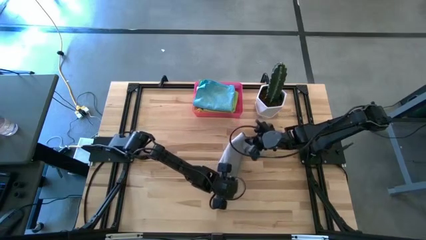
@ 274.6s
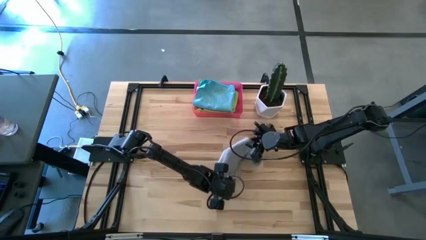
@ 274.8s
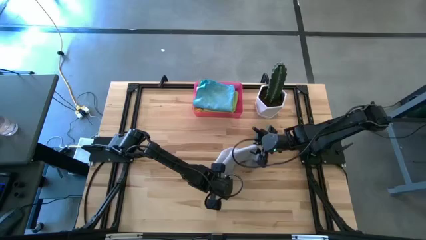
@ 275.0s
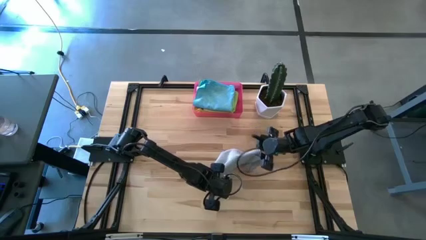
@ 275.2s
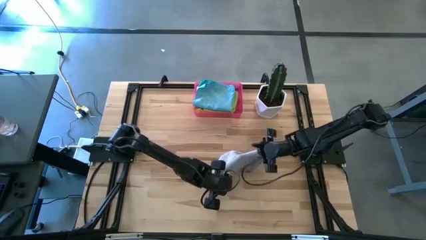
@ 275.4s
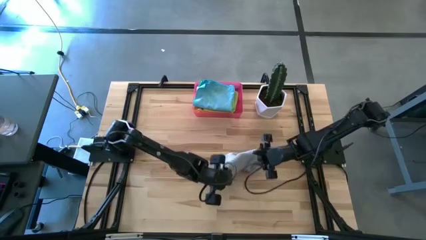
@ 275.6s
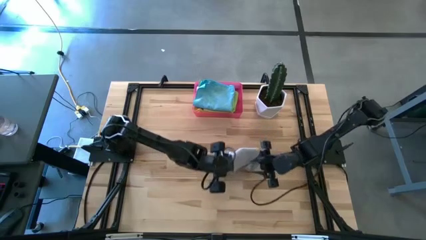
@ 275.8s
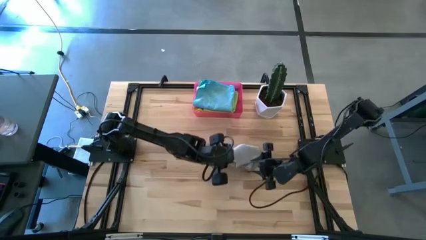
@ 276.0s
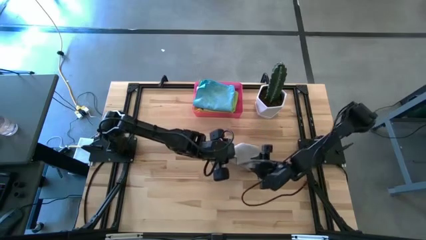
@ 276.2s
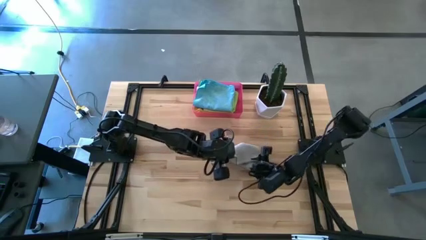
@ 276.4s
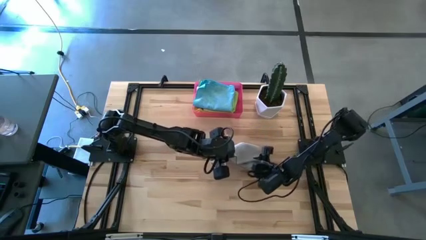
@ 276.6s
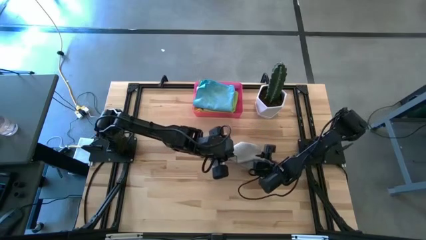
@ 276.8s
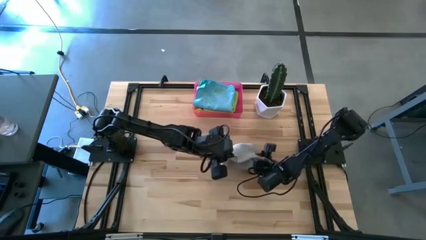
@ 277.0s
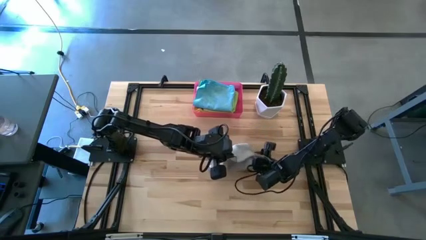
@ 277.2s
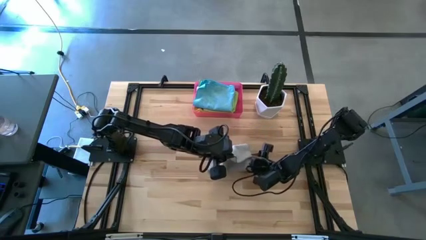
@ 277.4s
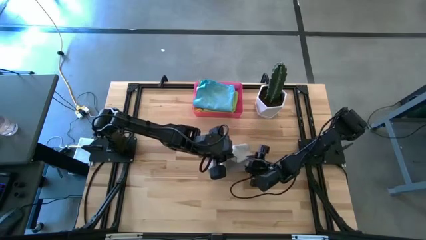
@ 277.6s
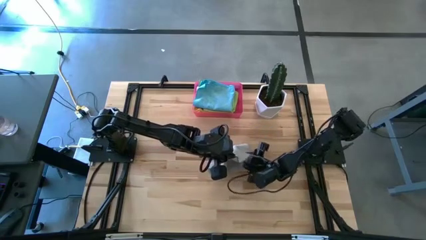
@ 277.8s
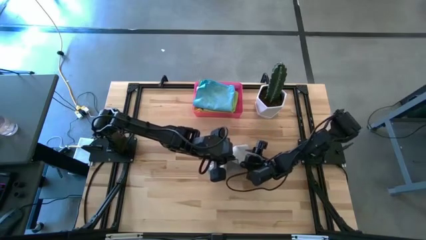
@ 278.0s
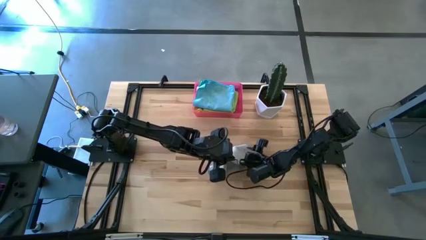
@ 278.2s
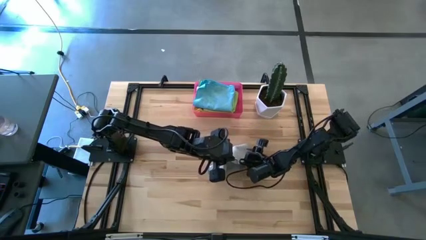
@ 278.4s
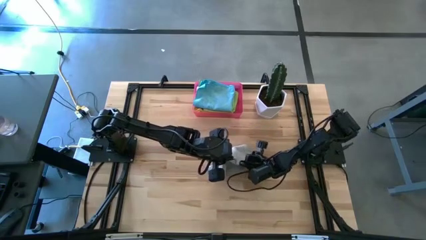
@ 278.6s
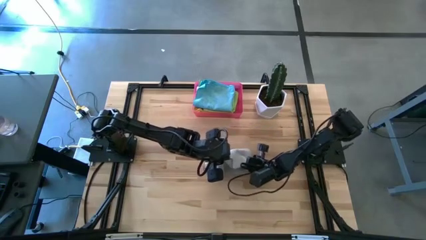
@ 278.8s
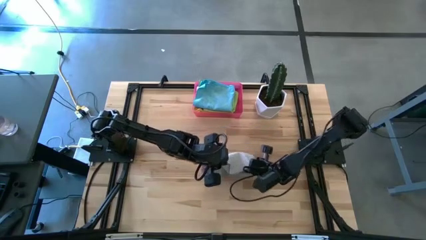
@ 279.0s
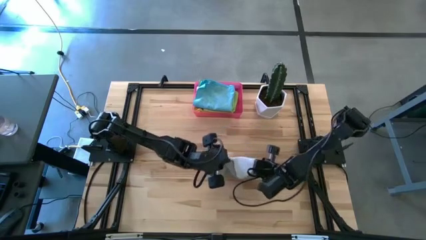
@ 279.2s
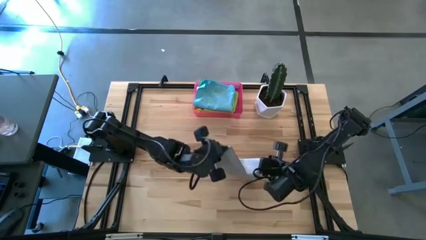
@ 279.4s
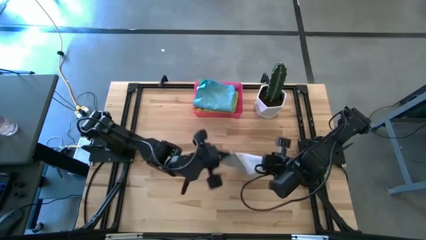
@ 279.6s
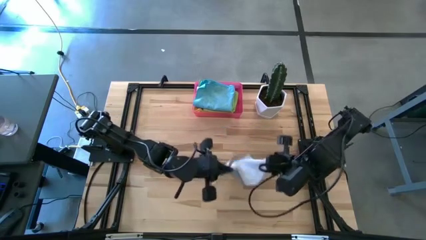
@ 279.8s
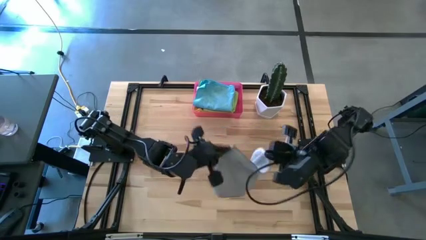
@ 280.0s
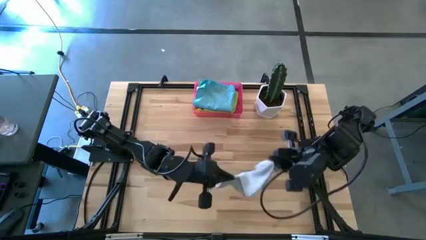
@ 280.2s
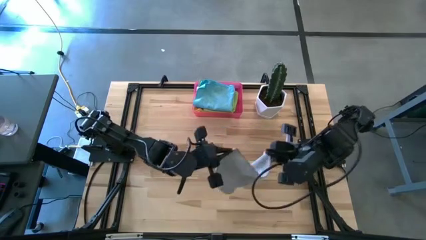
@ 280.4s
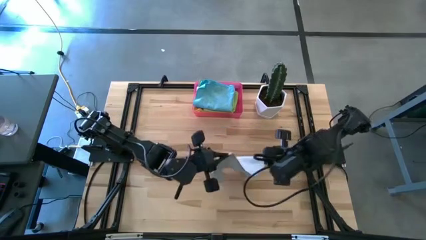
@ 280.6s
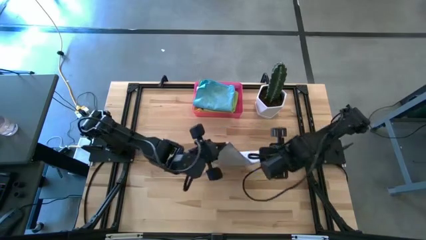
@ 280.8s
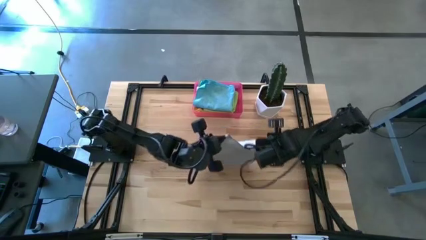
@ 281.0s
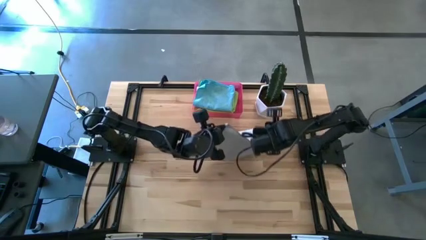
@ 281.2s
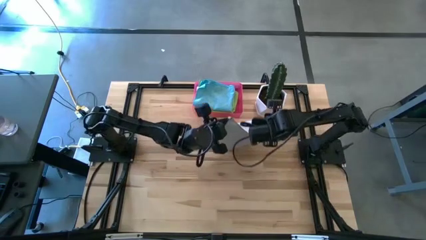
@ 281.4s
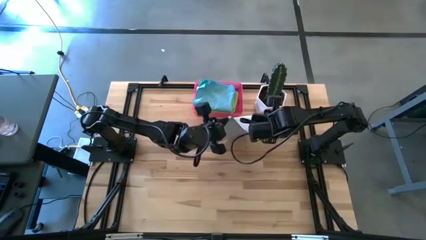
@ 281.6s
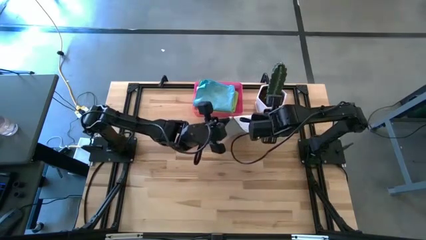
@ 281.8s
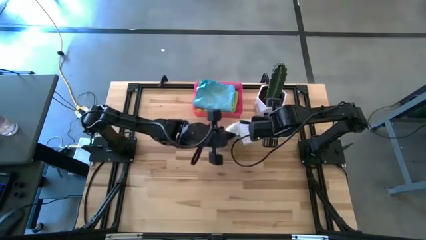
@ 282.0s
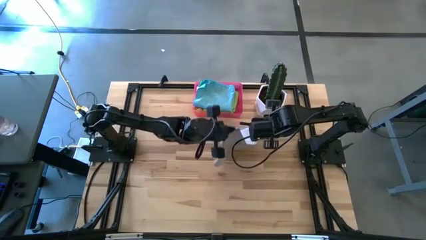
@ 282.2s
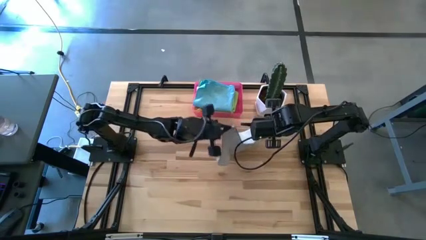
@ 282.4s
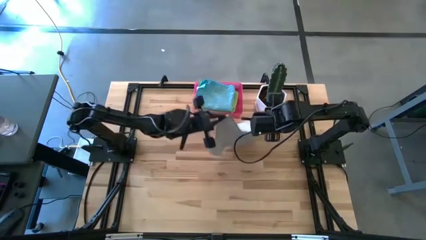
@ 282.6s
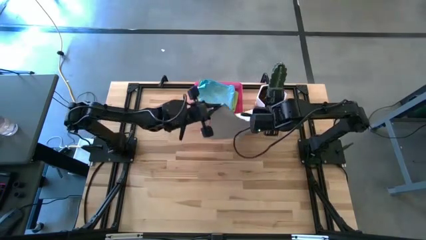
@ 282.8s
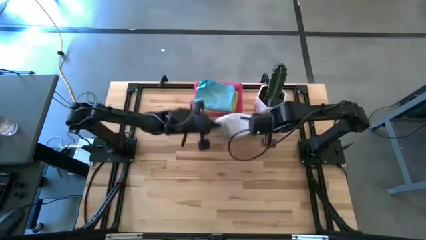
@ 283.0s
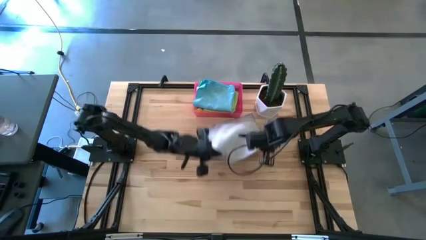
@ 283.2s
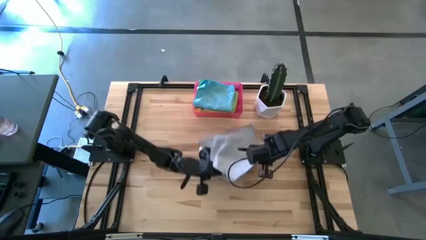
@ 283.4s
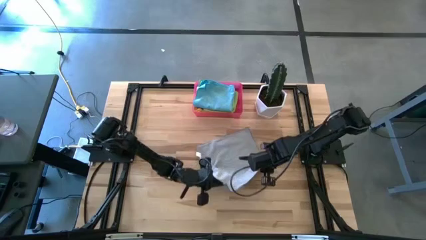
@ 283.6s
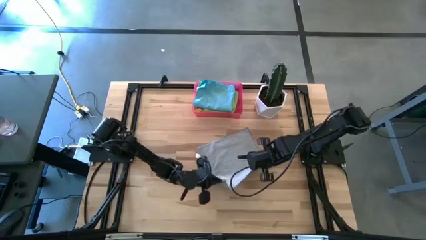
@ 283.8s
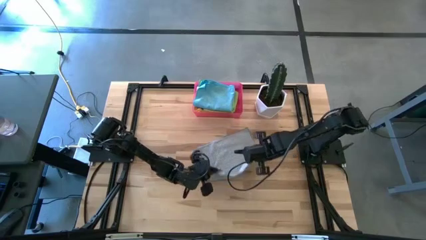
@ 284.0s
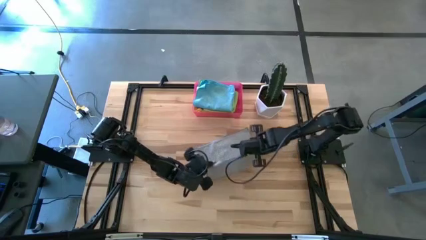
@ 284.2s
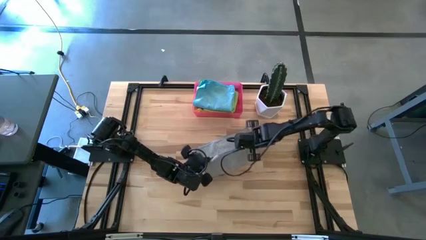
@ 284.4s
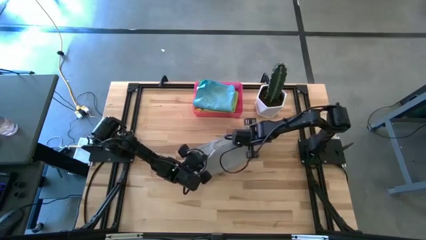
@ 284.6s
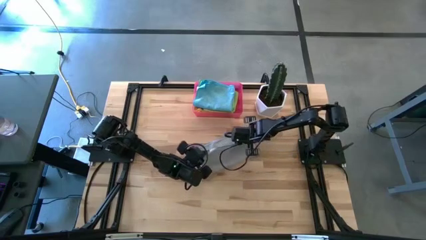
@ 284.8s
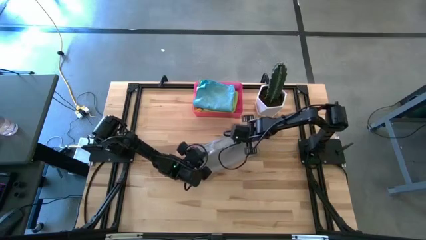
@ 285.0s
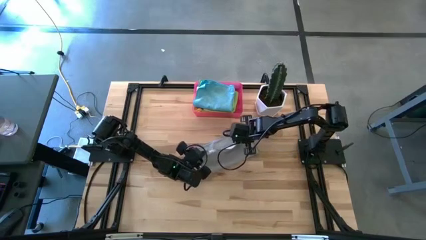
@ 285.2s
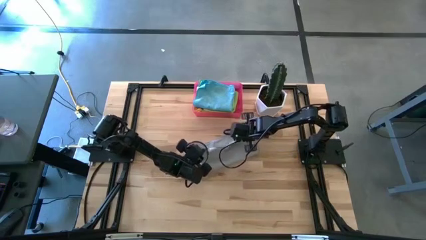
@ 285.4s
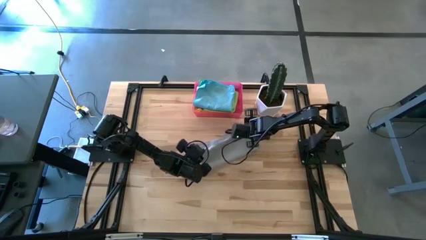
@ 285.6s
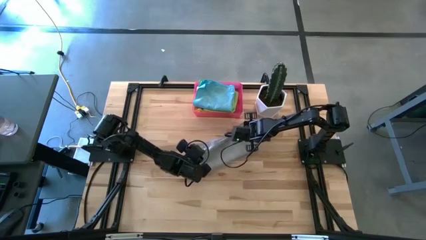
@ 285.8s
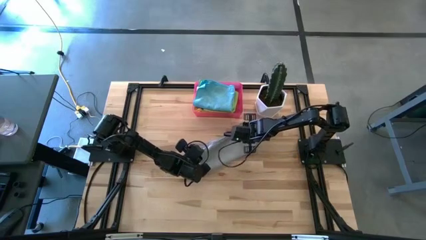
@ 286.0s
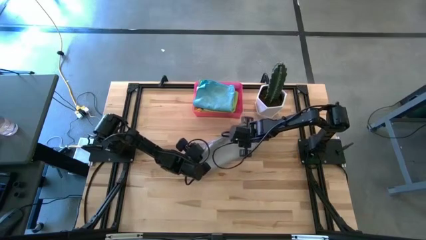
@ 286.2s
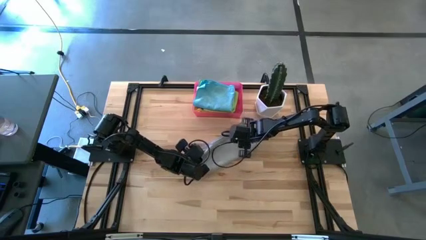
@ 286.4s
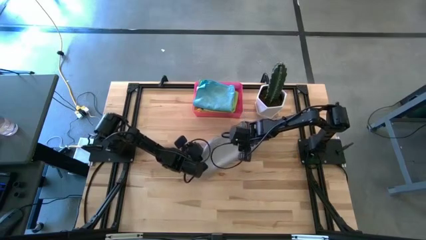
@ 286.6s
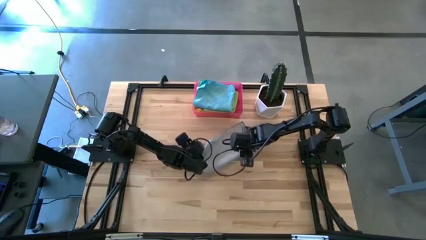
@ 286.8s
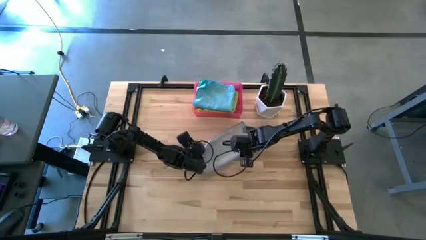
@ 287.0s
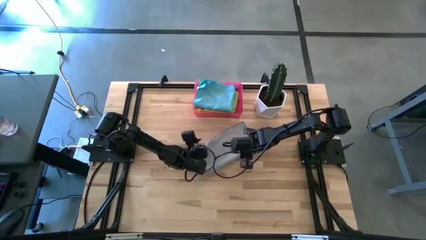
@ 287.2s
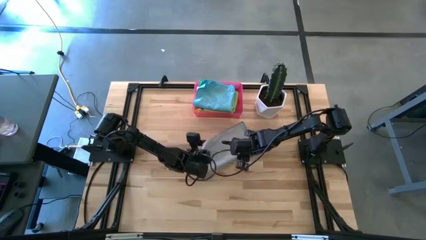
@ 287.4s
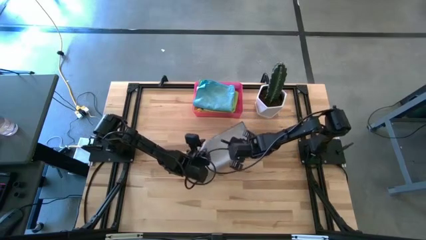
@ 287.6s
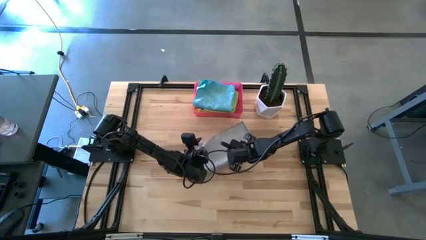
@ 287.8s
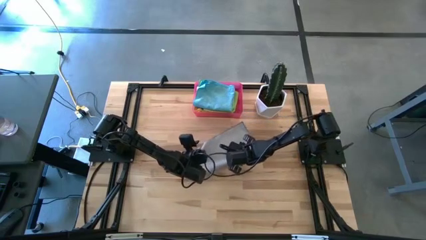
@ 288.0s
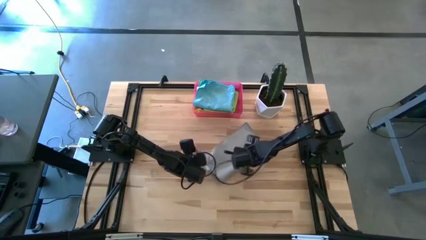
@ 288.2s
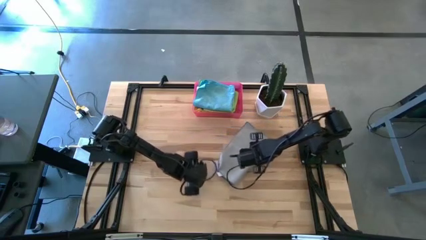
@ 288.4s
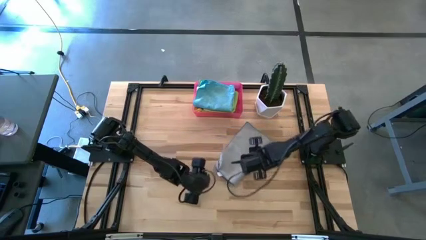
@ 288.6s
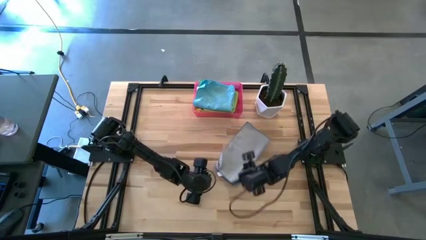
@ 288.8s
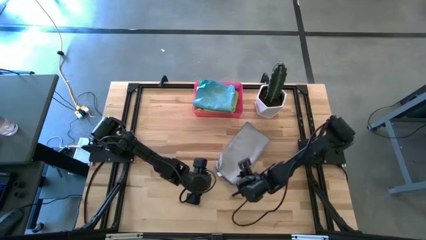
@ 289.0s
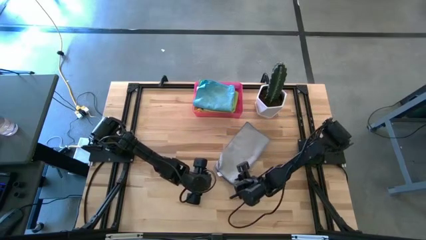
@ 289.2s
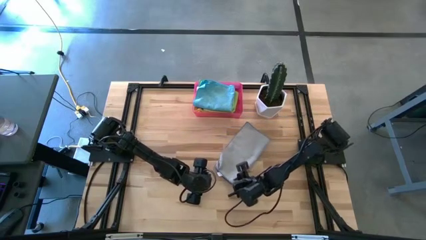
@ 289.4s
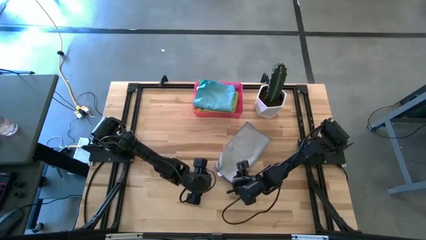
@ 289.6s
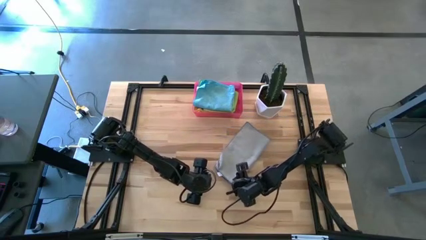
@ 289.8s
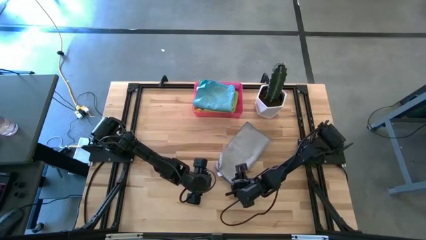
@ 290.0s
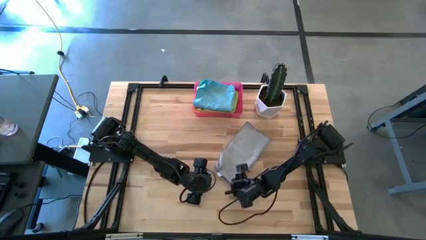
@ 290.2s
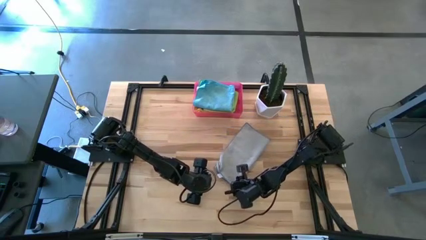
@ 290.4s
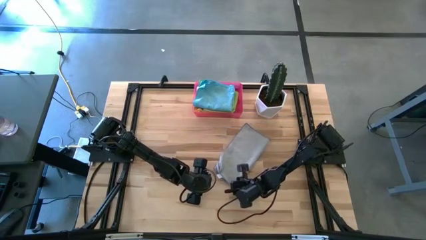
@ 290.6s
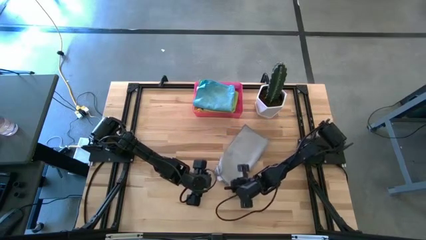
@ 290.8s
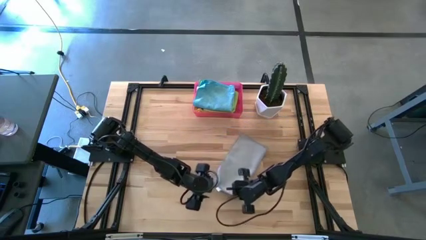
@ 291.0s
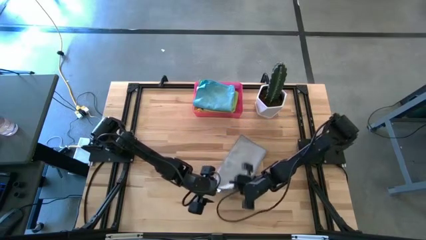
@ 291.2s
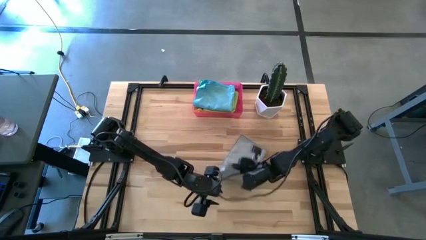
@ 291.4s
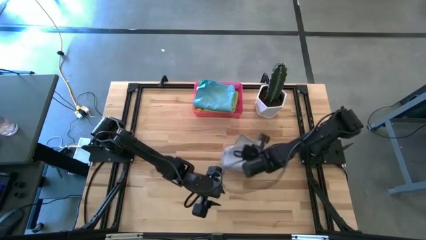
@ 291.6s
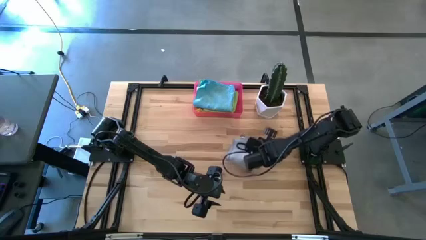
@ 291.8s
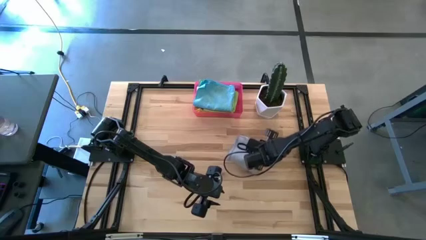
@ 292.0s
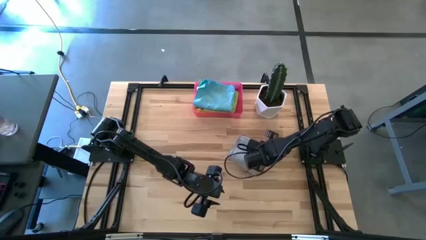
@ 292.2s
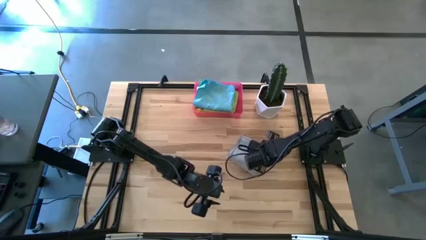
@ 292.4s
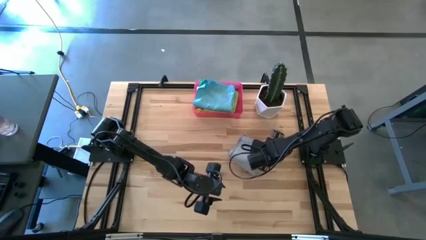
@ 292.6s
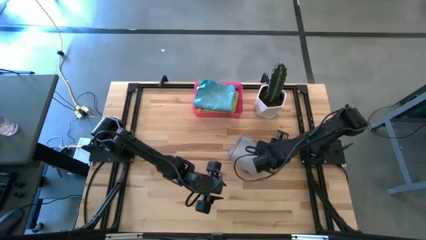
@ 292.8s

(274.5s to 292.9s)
Task: Fold microfiber towels
Fold the gray microfiber cloth on the table
